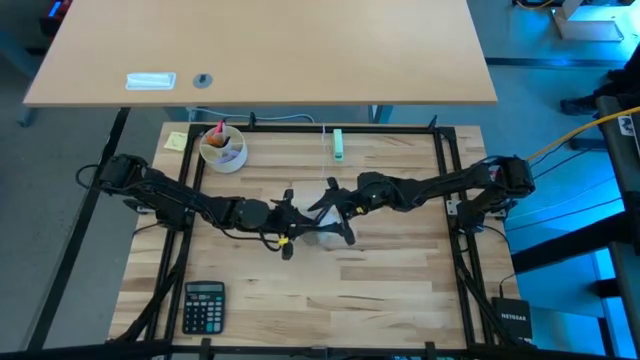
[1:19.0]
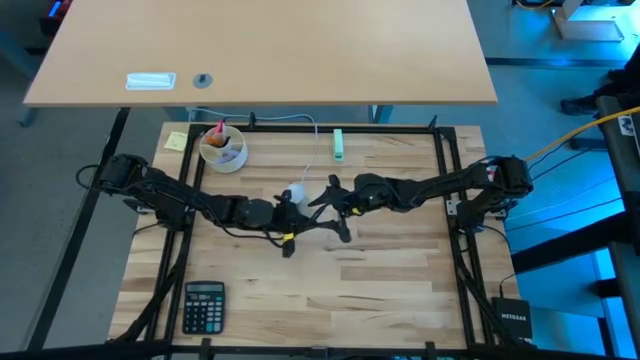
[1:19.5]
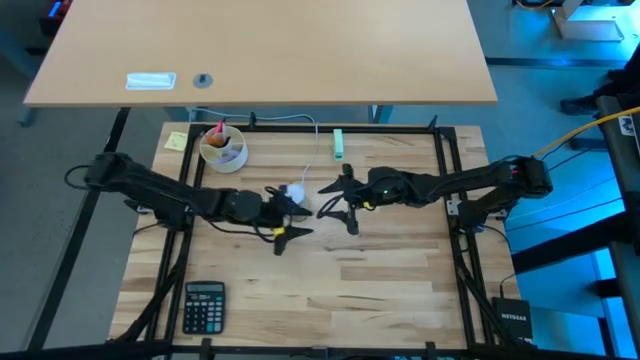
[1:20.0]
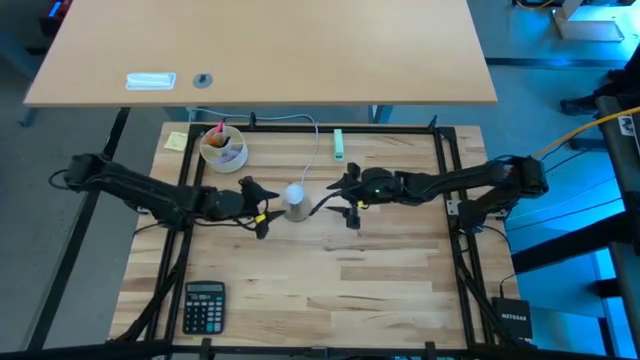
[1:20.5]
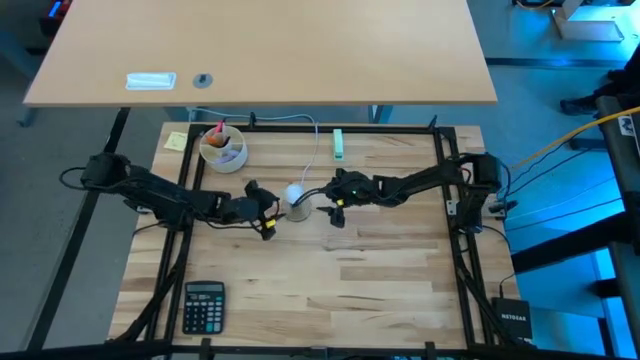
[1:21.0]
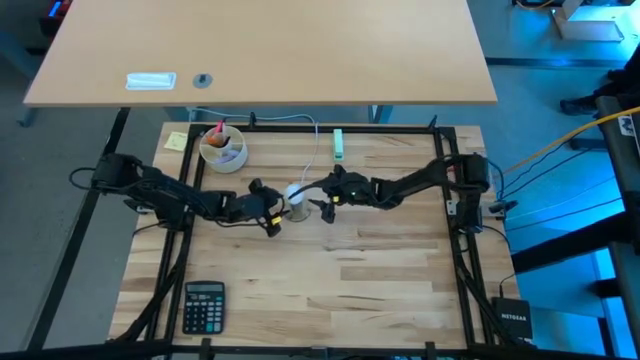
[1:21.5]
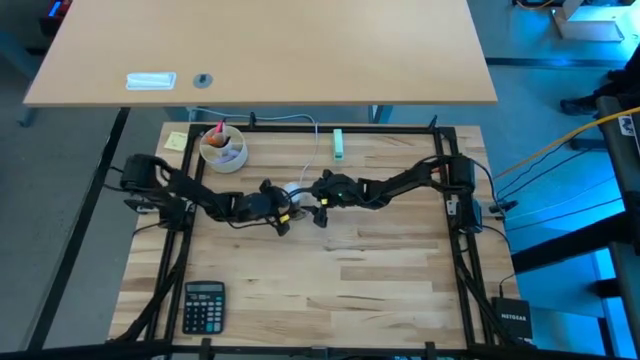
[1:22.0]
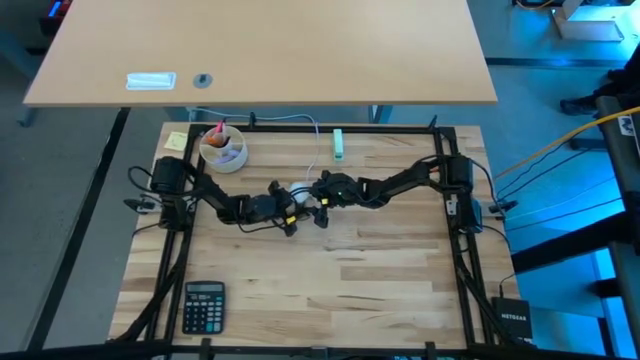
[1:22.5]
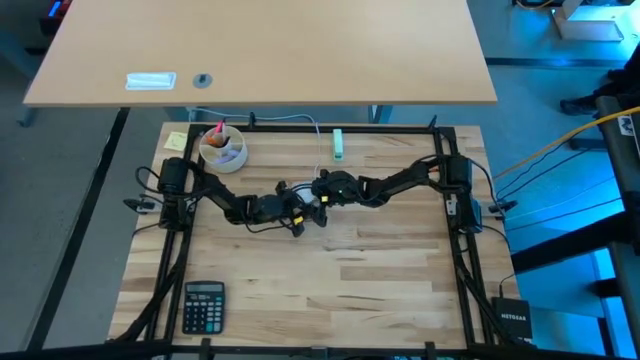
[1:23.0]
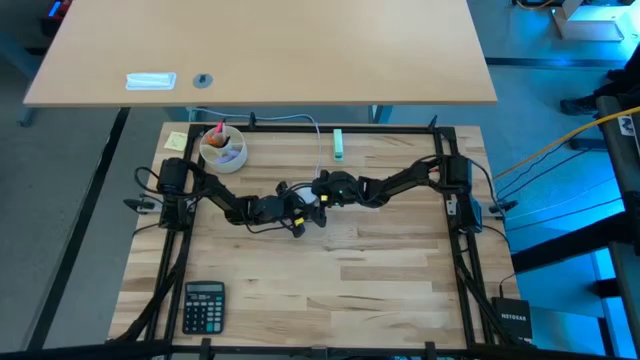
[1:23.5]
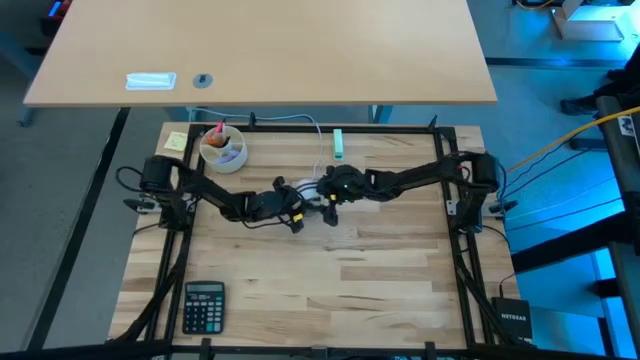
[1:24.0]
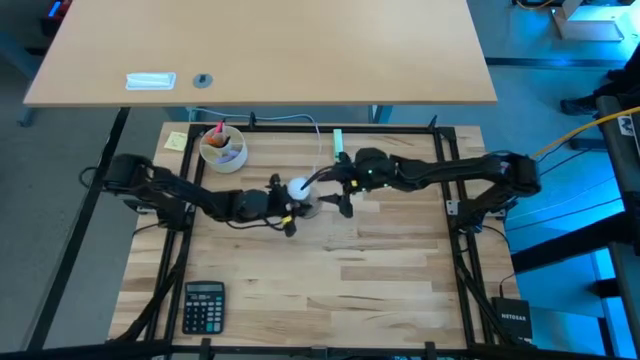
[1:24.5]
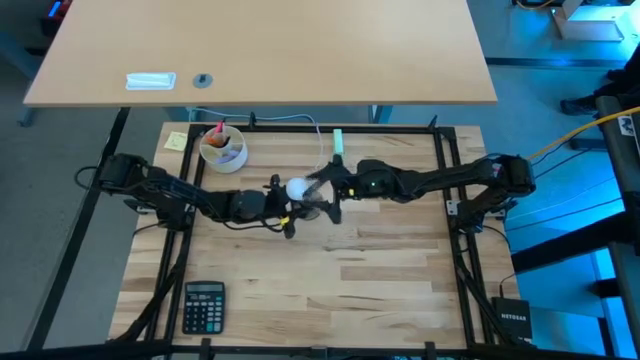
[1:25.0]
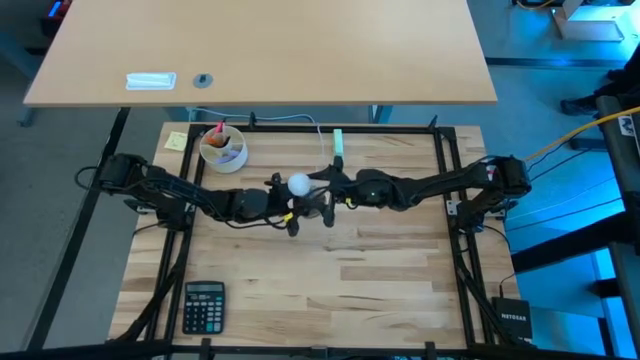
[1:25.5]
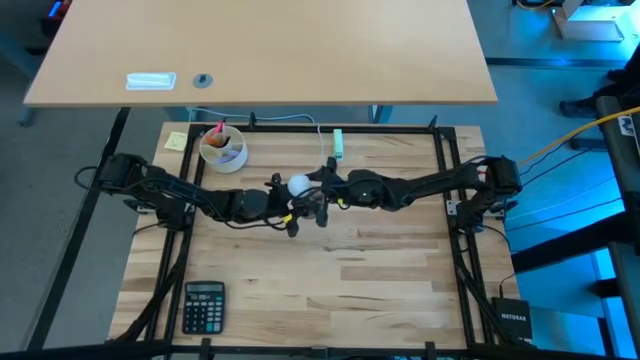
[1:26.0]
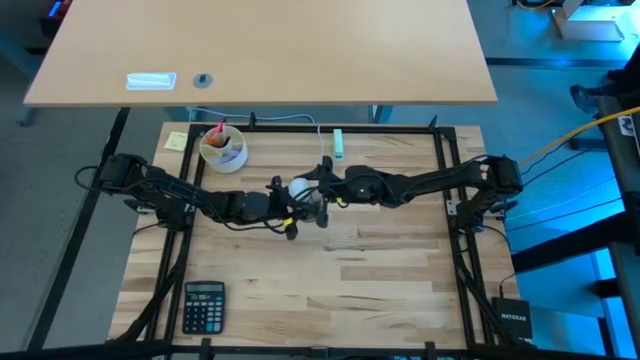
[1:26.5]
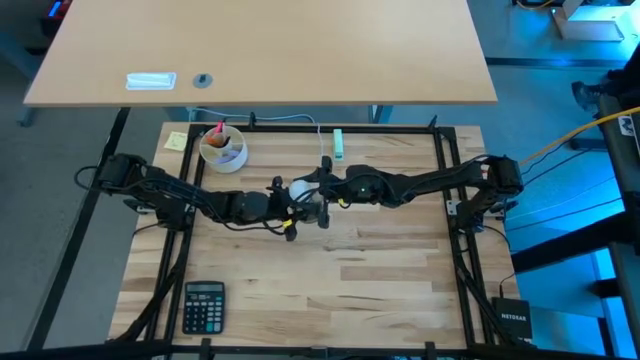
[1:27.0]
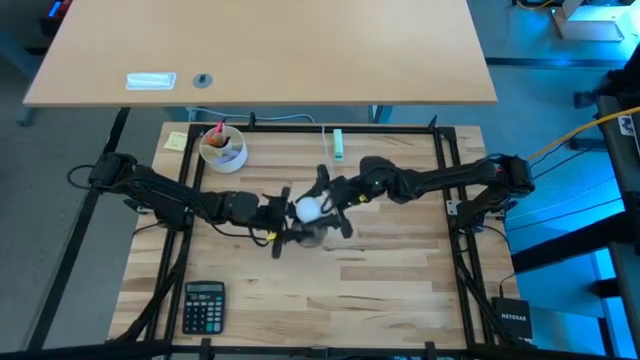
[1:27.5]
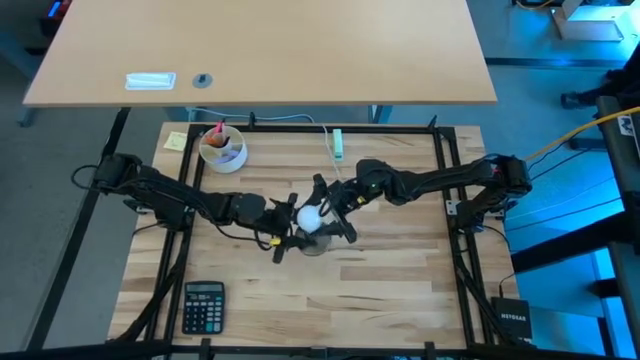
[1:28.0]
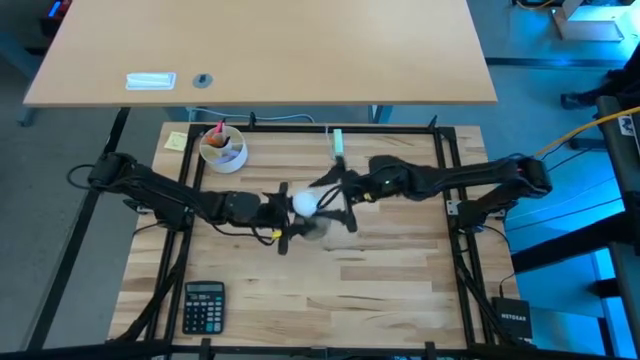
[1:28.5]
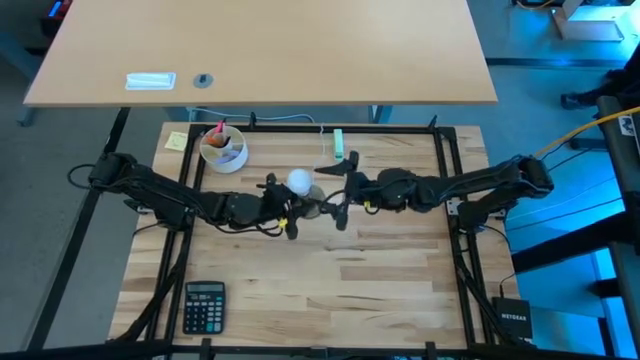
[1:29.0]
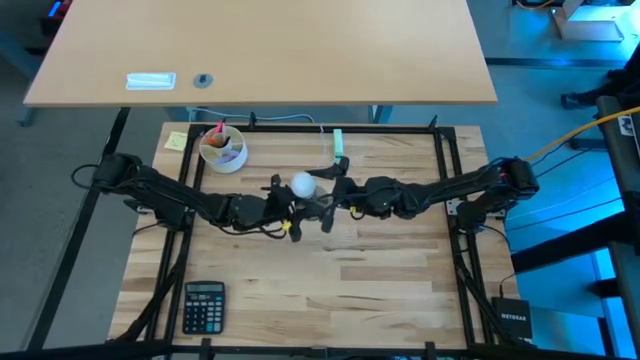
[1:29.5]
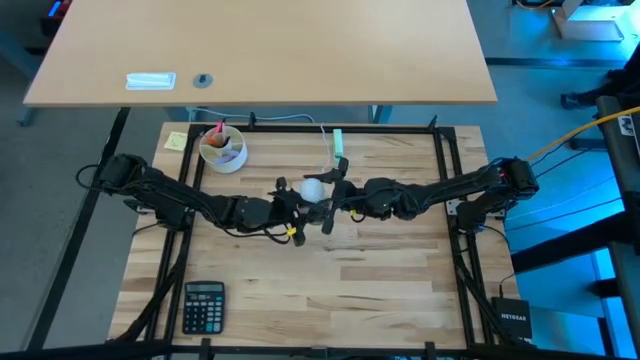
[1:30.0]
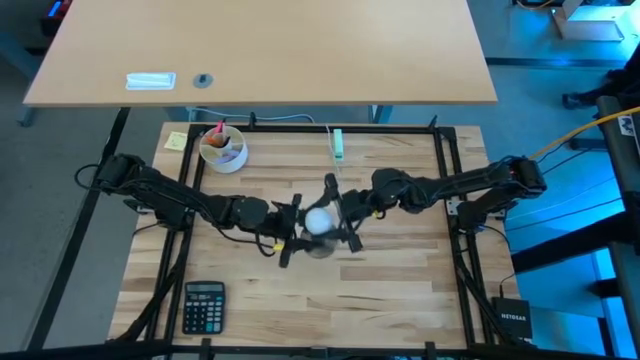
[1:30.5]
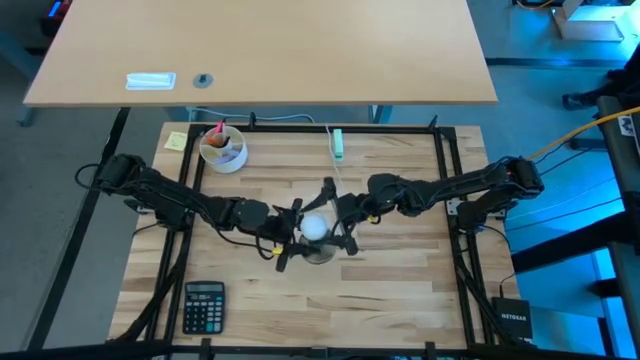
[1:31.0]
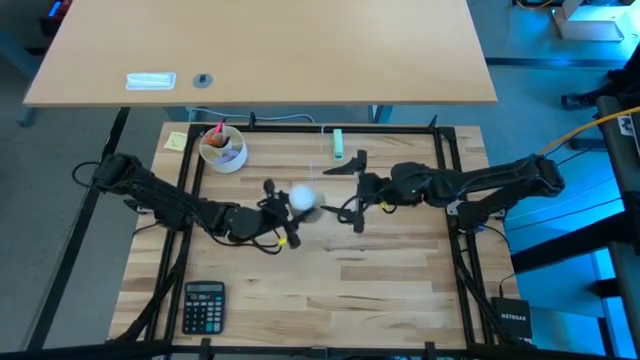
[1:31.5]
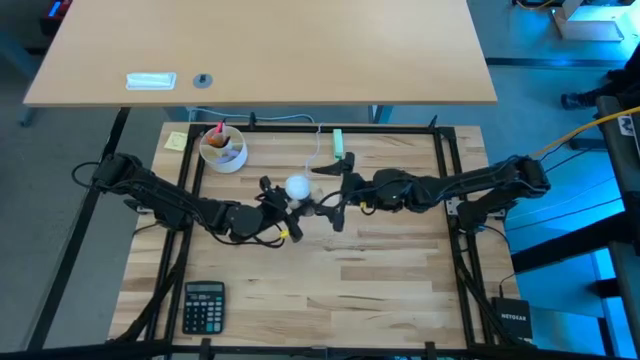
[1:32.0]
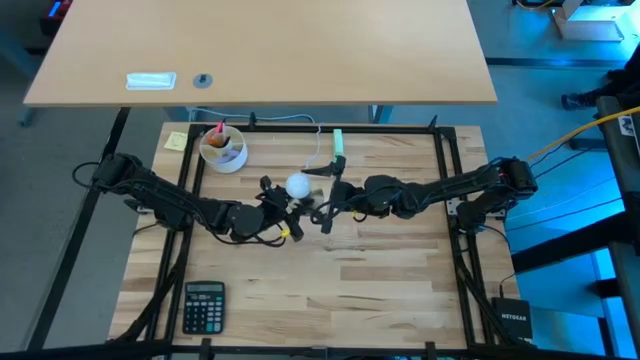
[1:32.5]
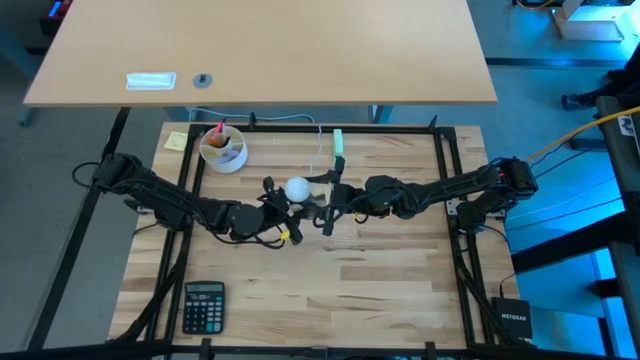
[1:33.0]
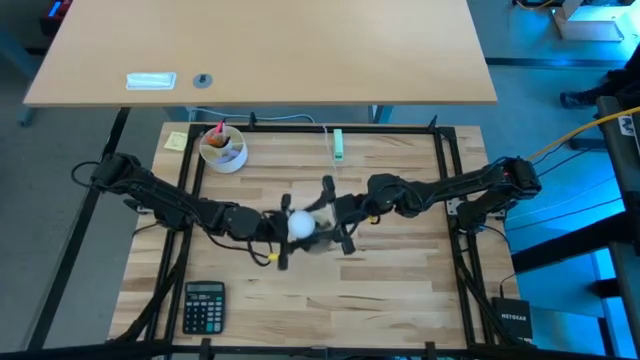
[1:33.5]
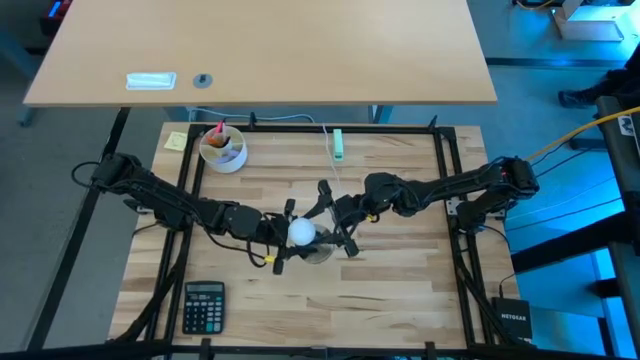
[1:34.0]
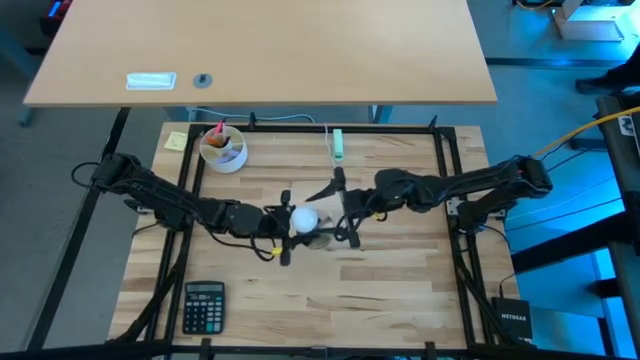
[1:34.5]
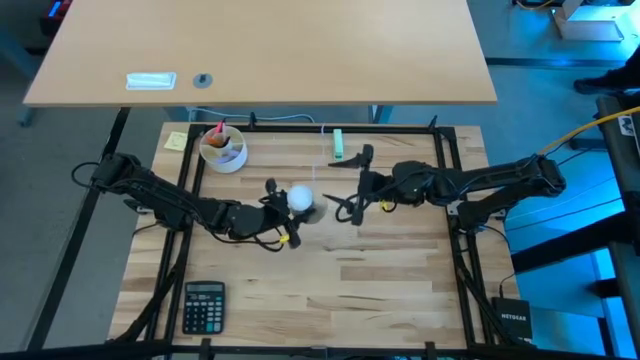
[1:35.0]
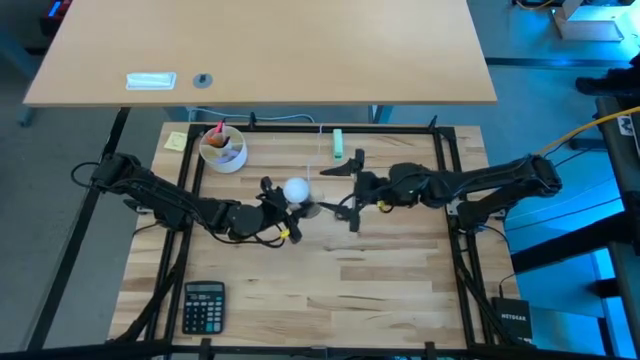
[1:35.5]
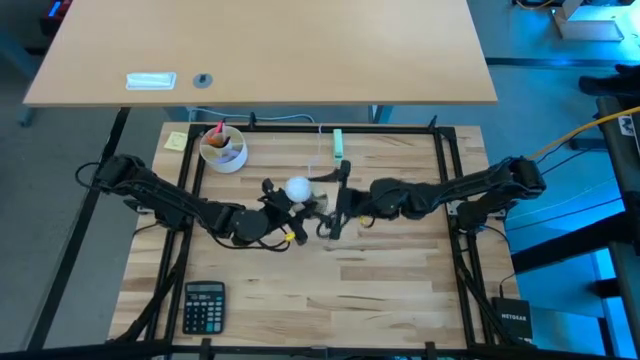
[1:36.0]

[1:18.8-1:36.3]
Task: Screw lightbulb
Remove the lightbulb from the lamp socket

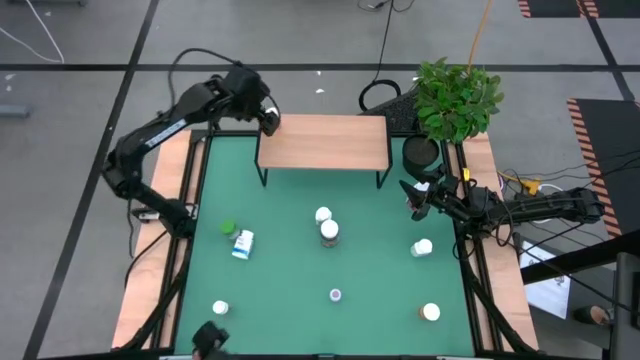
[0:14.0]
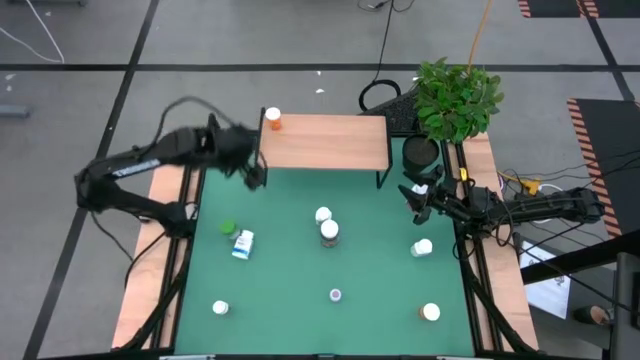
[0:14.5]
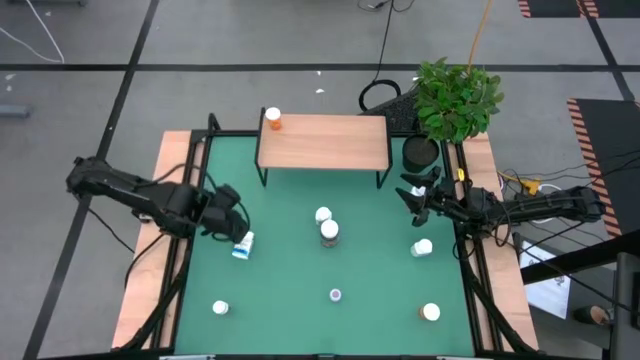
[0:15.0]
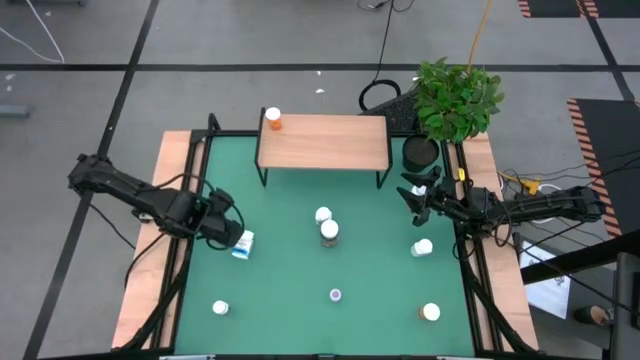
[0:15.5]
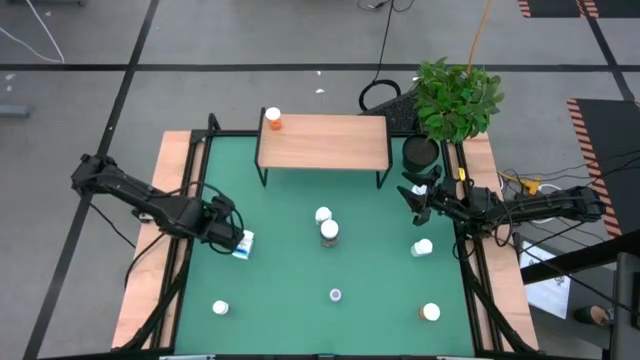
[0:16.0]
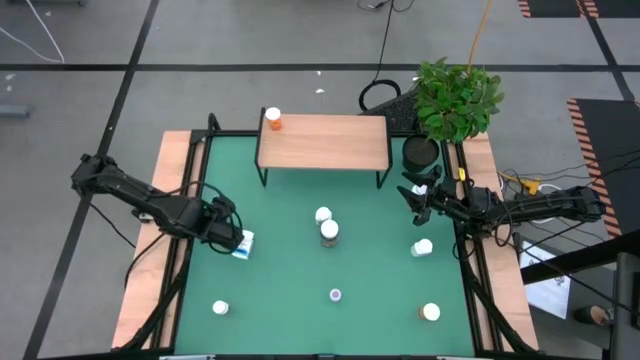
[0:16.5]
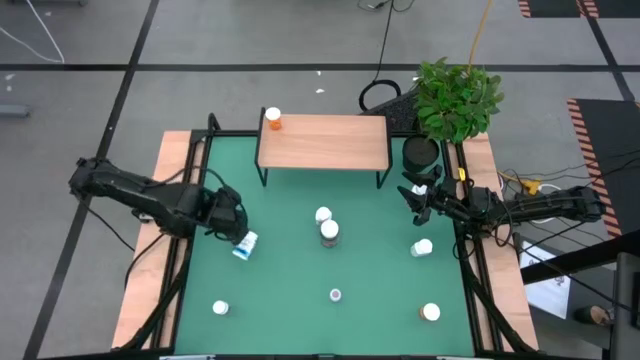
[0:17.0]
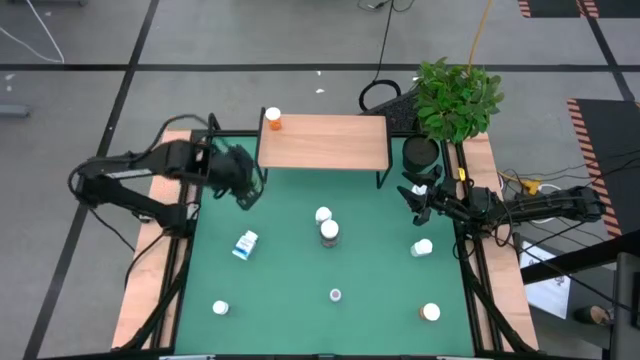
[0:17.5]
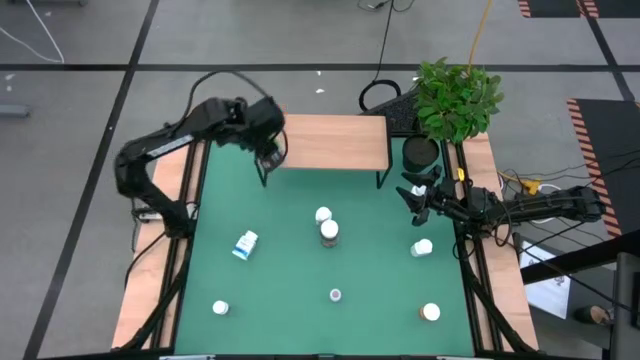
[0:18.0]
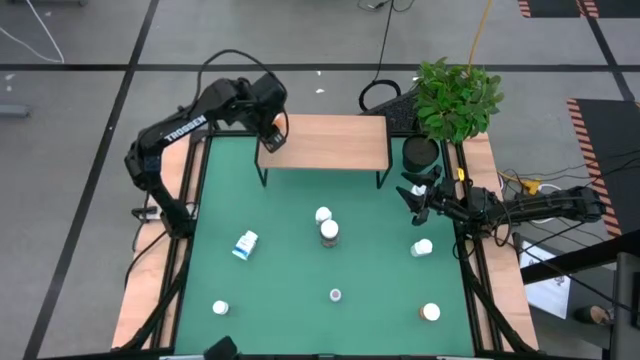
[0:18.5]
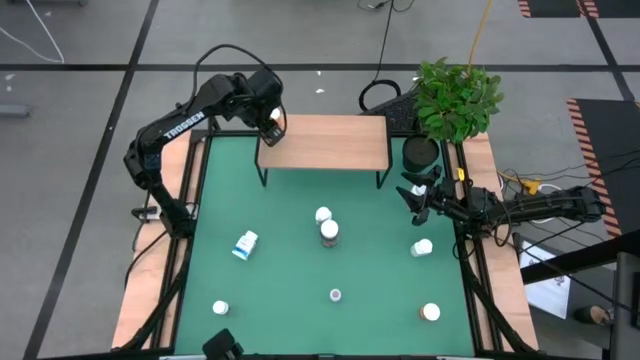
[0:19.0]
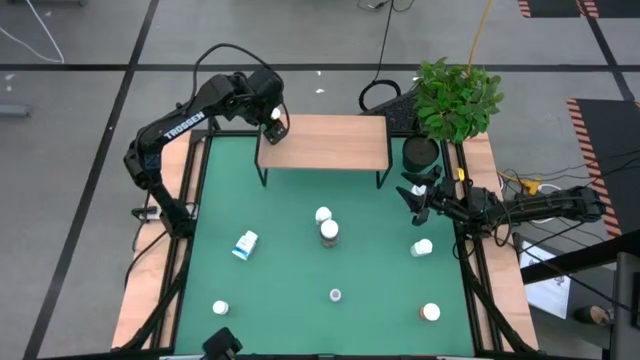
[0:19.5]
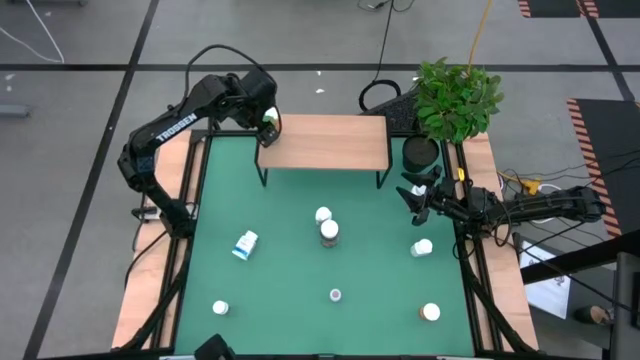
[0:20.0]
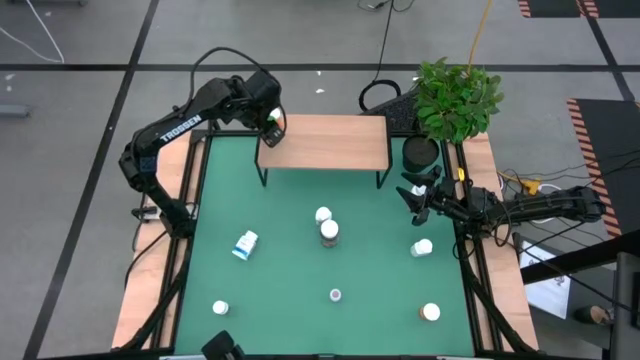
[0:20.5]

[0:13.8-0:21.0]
Task: Pick and place medicine bottles onto shelf by color
Put the green bottle on the shelf
